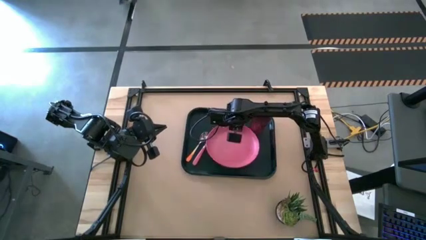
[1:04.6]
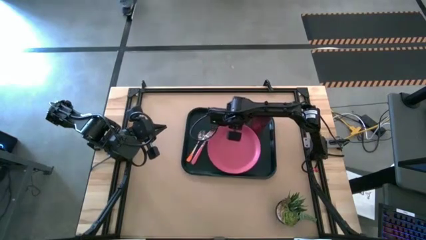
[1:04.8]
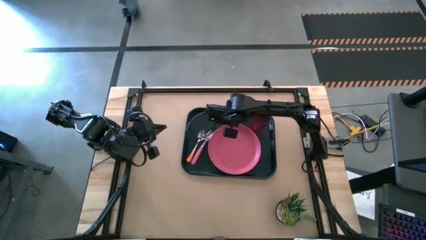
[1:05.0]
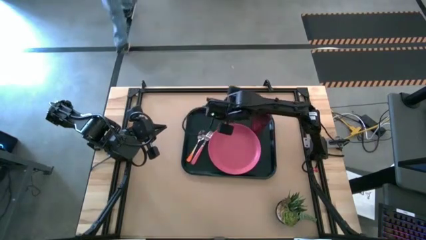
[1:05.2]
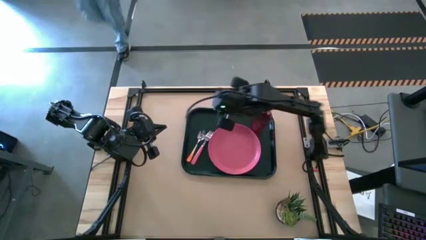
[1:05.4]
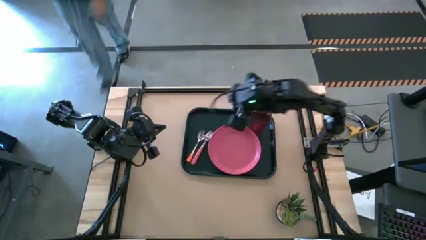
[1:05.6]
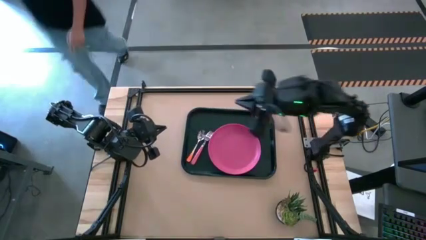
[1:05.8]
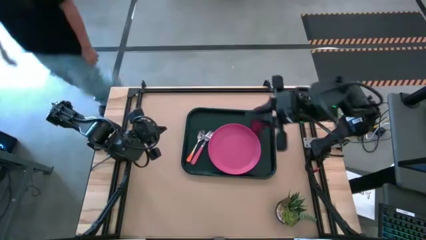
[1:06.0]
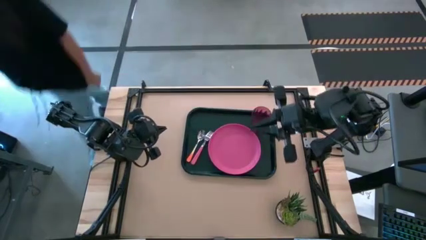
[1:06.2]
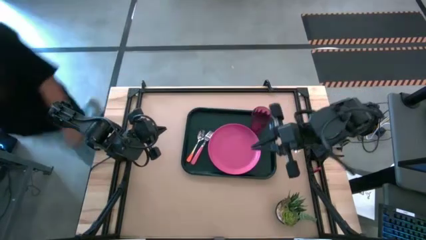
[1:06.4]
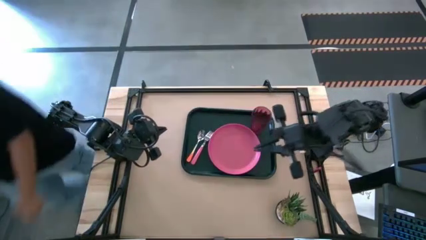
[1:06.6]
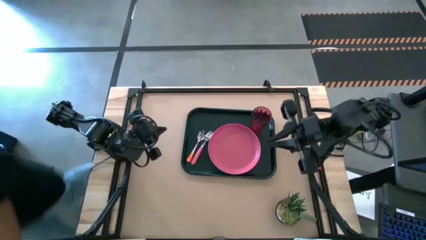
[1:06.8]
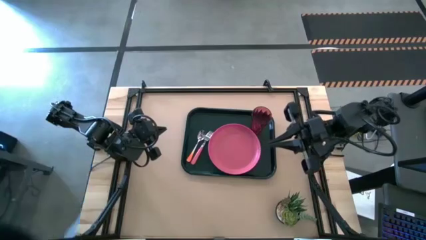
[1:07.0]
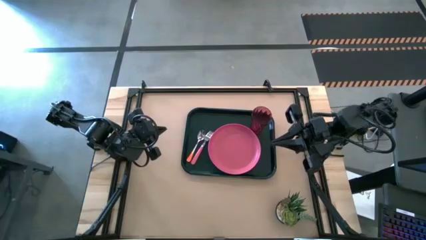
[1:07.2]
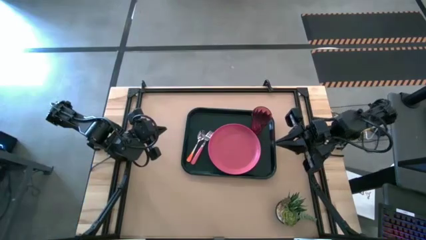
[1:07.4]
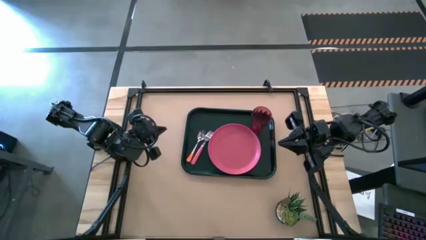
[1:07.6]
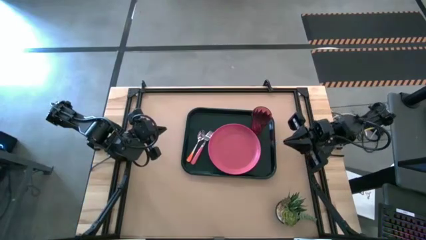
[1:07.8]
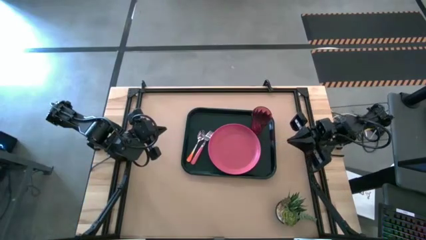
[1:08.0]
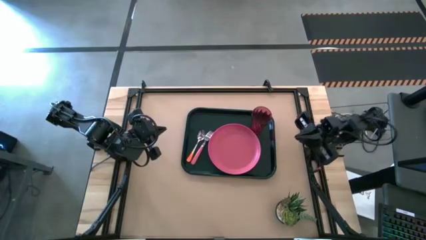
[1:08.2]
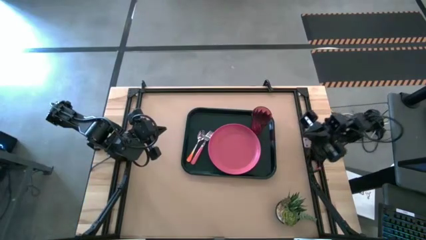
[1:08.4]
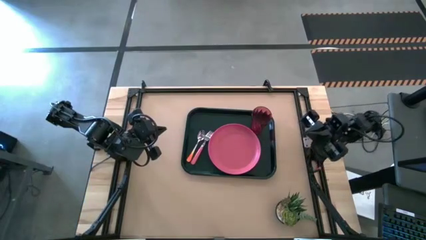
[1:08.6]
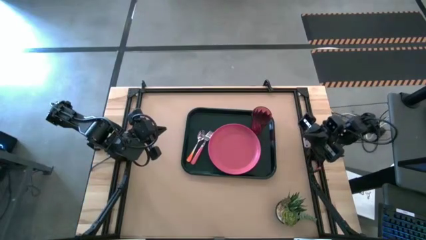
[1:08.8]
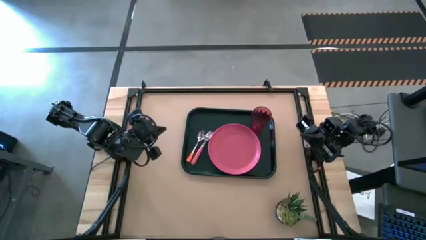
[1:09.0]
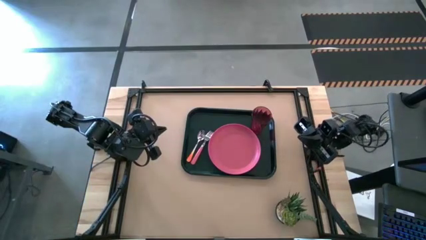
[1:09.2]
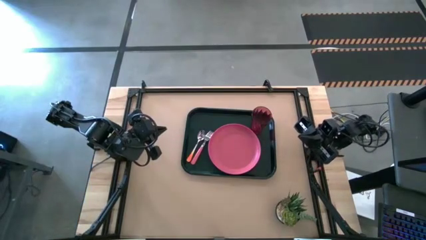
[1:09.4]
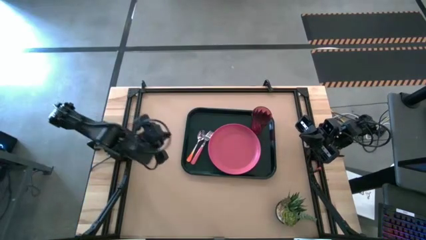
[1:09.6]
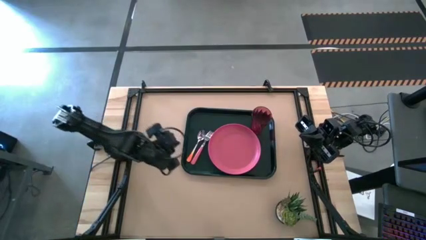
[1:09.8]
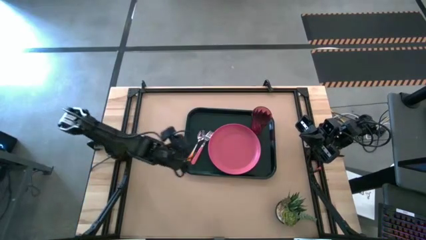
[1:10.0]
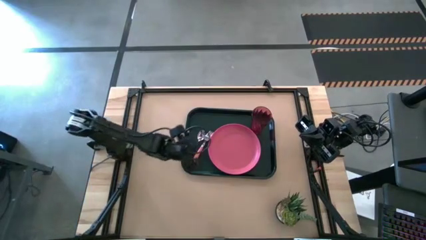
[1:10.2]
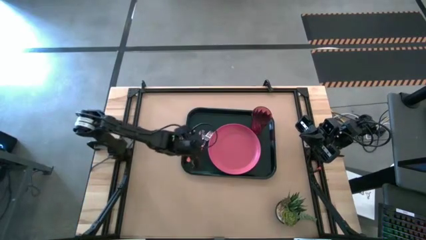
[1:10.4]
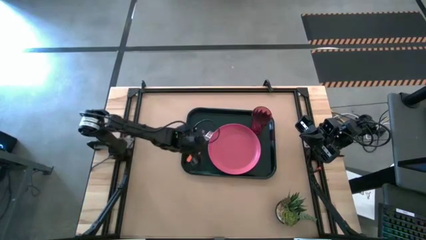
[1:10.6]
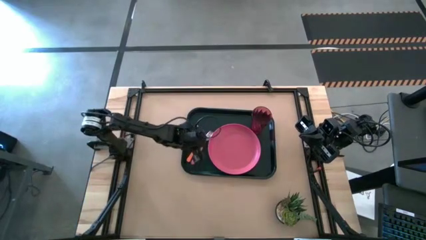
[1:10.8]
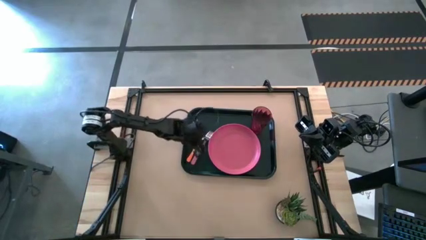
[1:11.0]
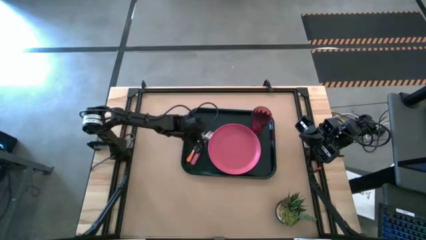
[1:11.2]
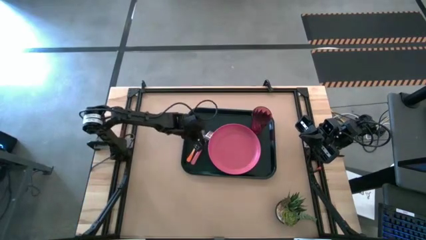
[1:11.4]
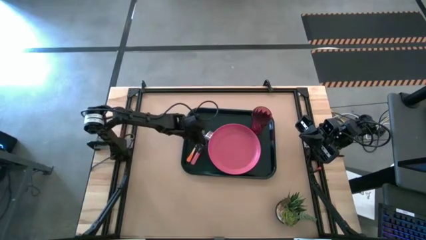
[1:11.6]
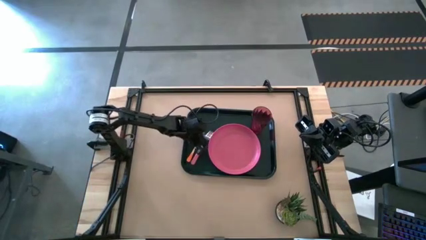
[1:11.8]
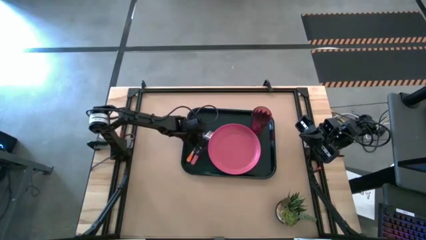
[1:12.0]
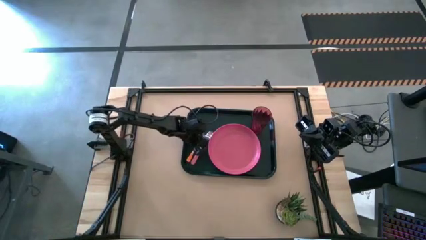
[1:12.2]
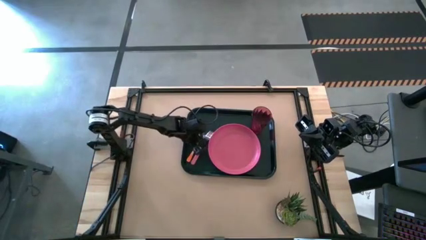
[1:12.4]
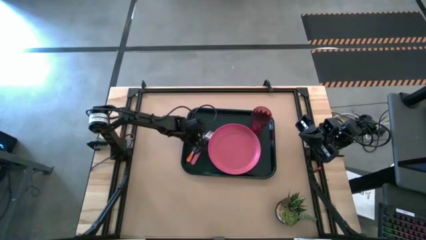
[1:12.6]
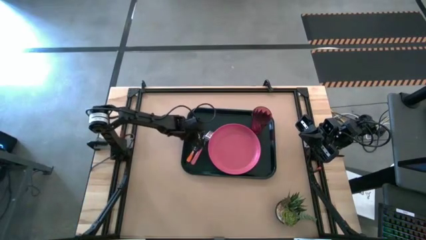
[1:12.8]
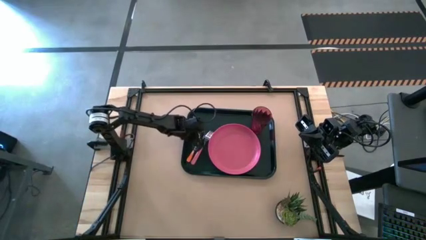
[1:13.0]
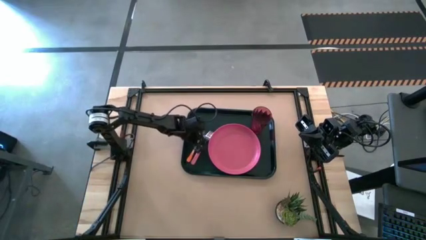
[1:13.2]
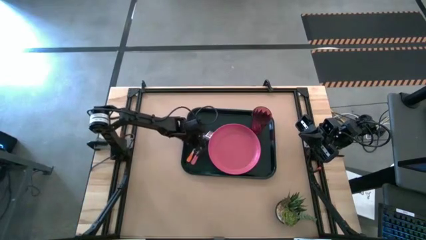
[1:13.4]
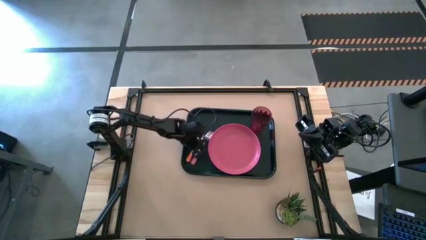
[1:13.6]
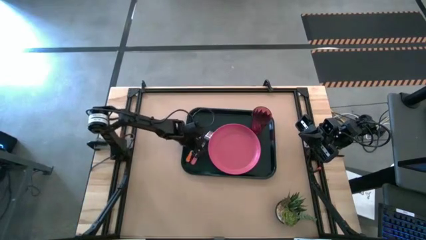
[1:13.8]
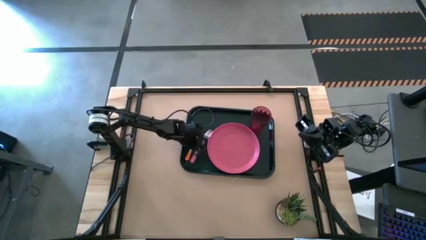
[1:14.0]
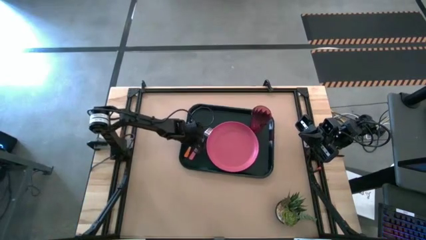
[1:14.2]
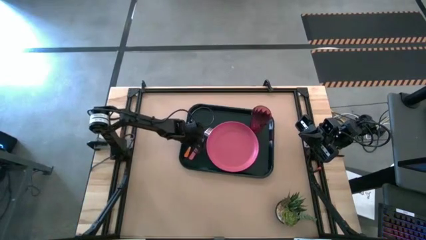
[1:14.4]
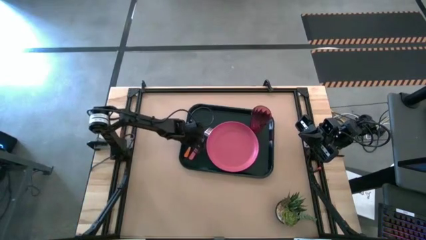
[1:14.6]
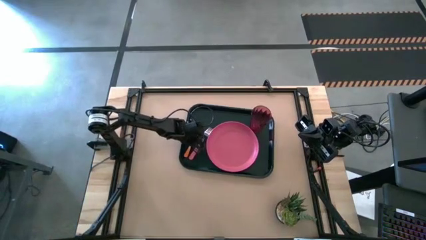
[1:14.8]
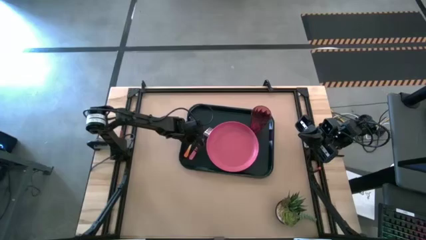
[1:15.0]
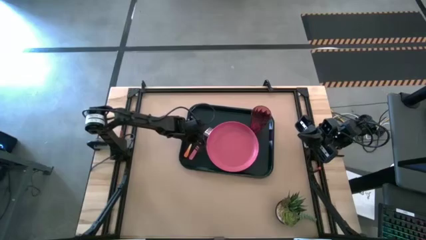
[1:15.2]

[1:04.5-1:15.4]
Task: Pick and place plate/cup/fork/spoon on tray
Adjust the orange spoon on the black serving tray

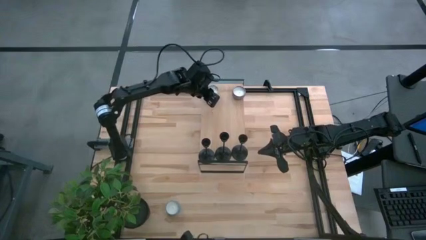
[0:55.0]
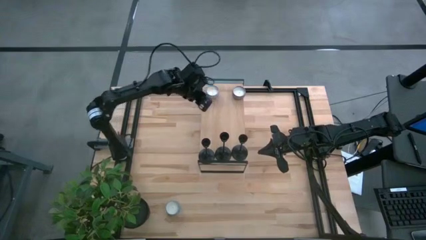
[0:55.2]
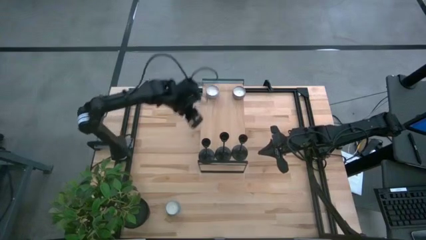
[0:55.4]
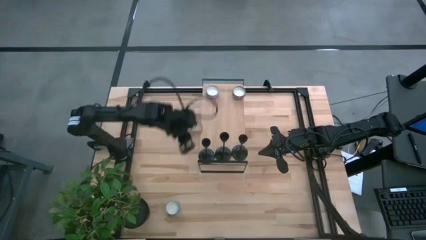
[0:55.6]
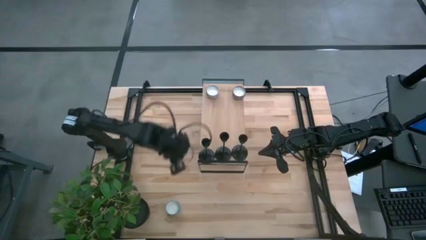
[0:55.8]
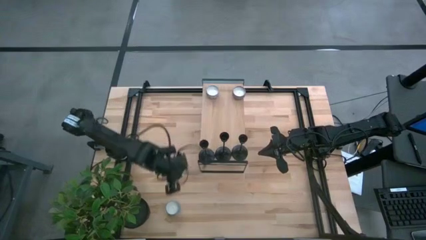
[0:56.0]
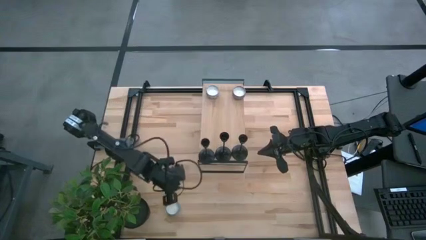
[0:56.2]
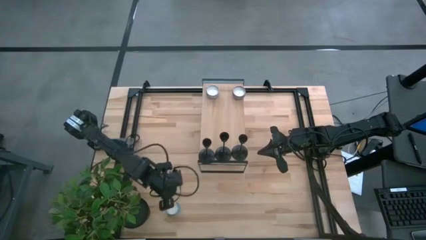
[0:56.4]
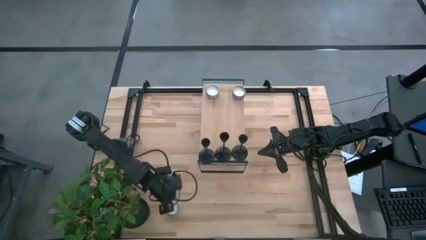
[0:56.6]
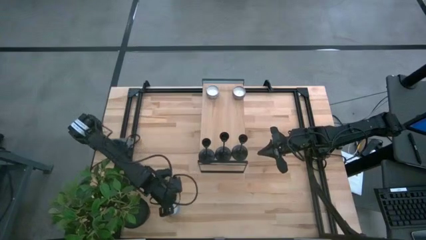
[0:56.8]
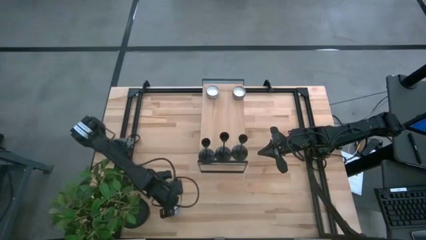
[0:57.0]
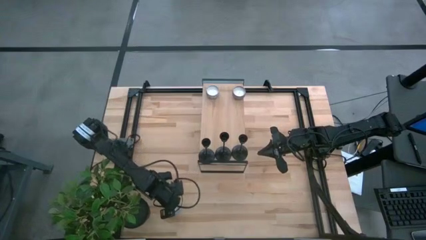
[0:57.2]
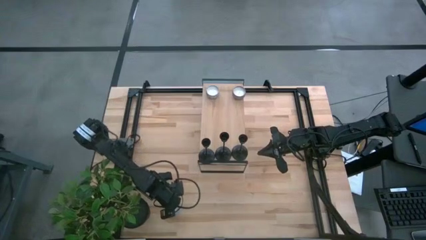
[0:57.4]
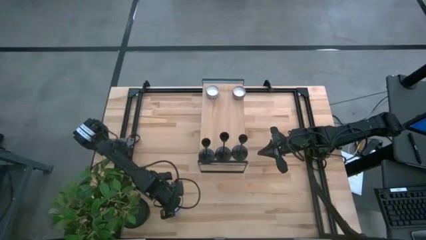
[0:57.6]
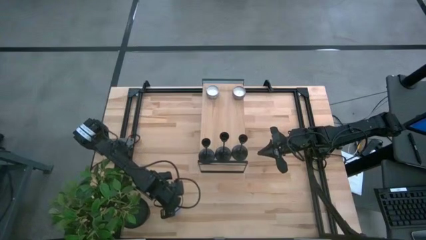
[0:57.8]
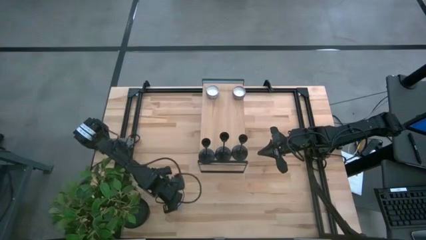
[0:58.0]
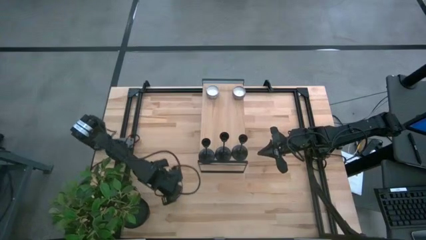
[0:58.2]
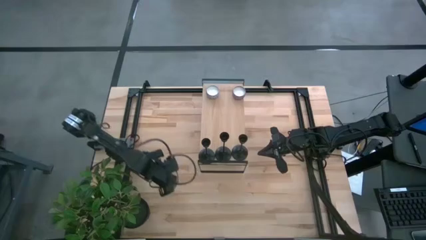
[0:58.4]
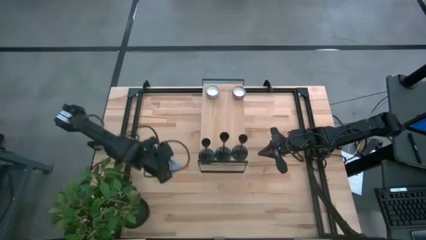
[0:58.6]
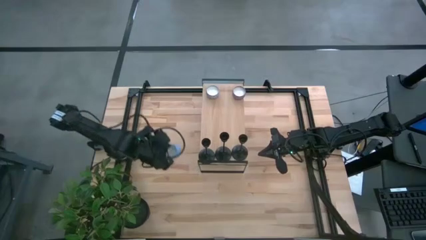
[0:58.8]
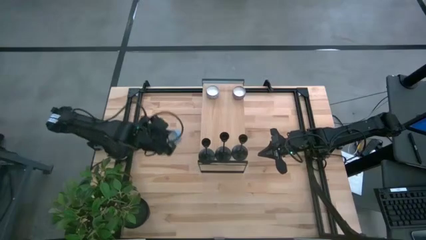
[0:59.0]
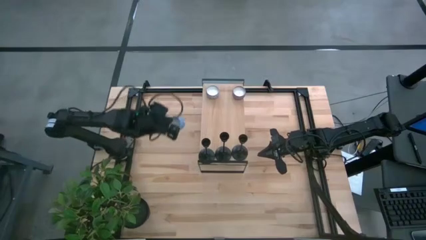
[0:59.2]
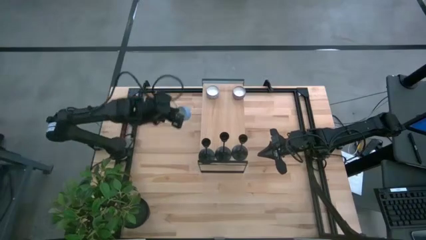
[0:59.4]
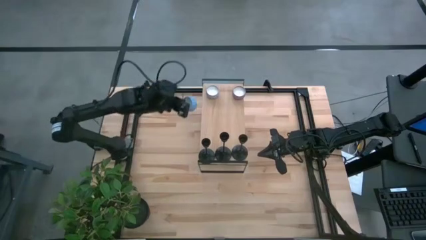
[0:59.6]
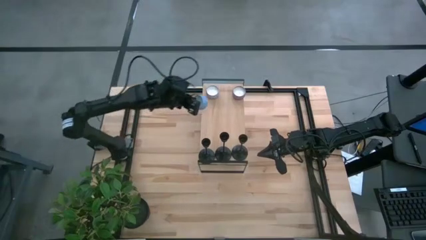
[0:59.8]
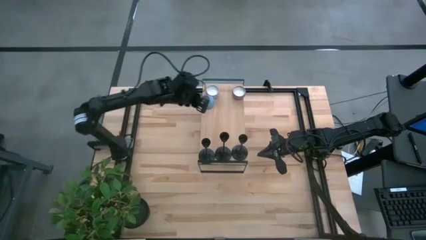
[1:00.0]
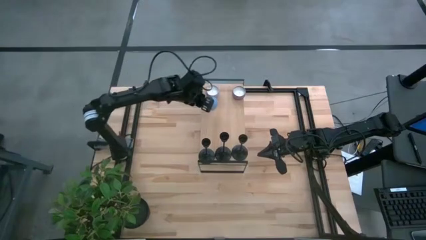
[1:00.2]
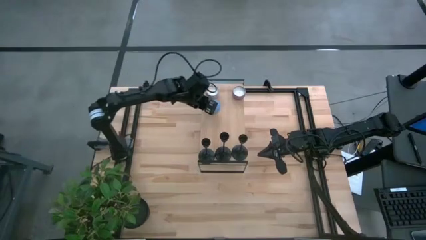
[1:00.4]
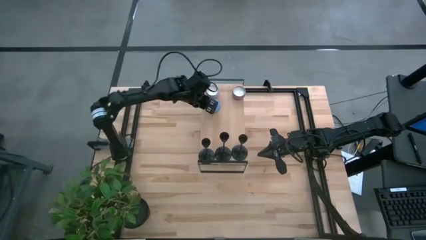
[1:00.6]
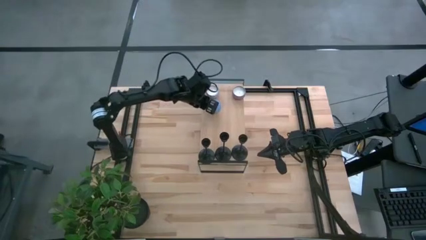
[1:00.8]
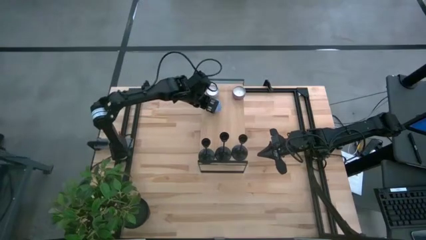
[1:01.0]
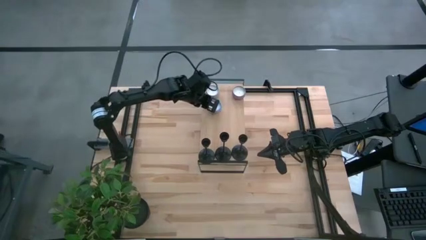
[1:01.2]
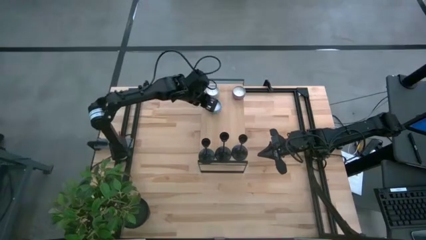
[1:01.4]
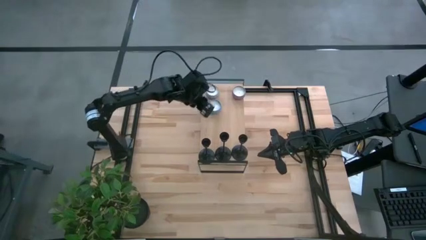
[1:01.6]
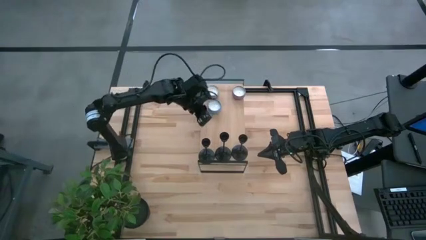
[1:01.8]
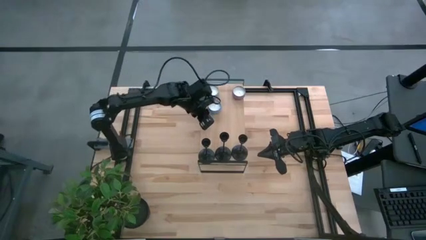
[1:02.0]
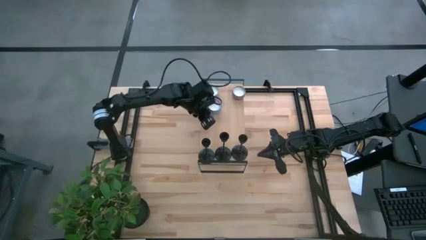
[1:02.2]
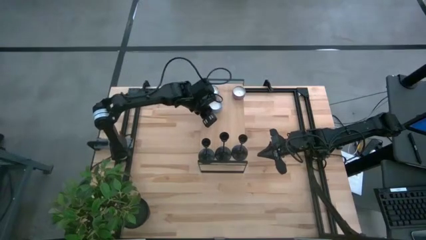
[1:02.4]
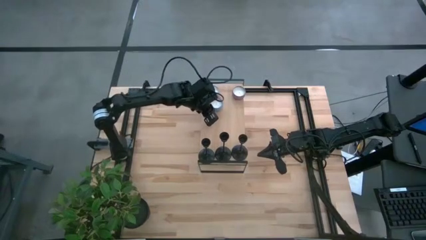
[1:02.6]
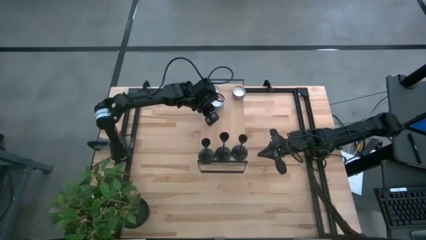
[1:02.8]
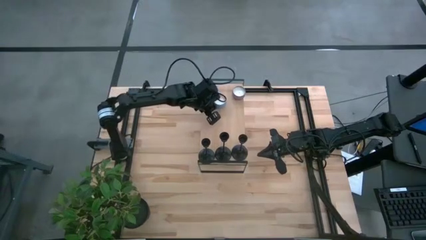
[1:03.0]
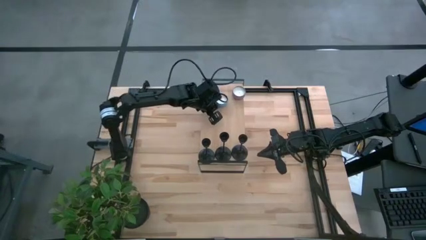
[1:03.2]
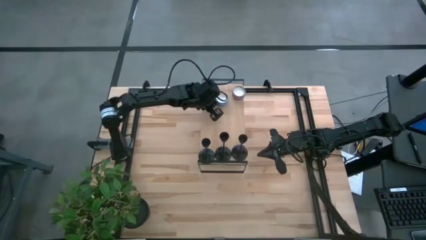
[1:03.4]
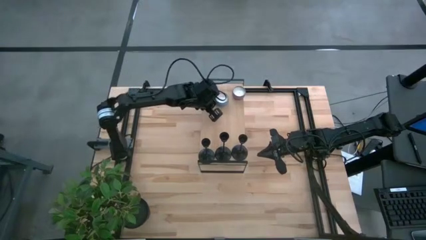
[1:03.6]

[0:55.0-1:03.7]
Task: Pick & Place candle stick holders
Put the blue scented candle on the shelf
